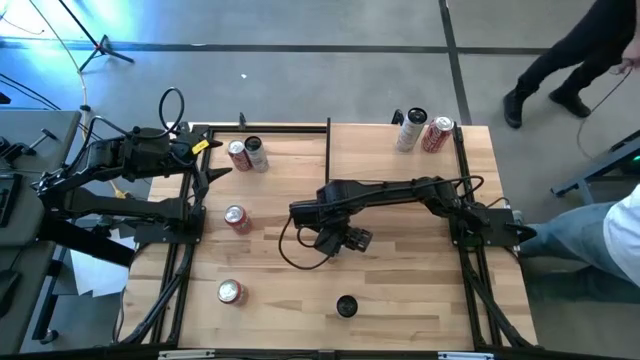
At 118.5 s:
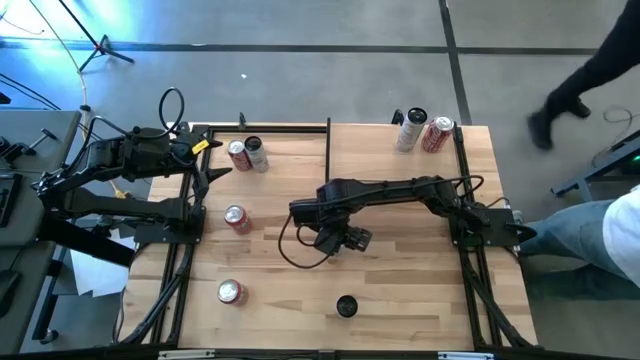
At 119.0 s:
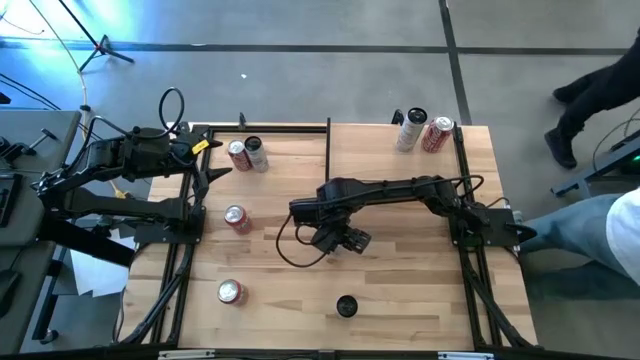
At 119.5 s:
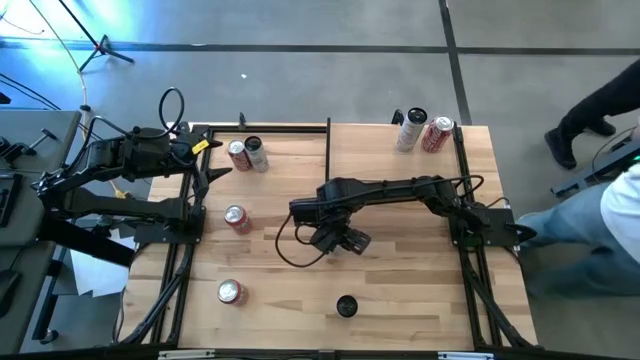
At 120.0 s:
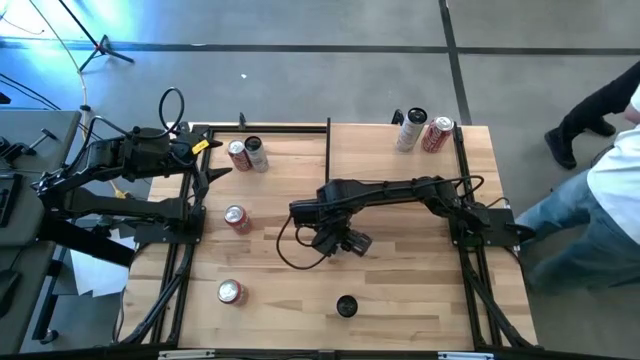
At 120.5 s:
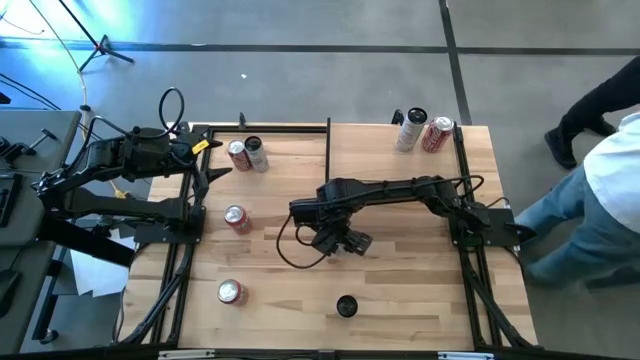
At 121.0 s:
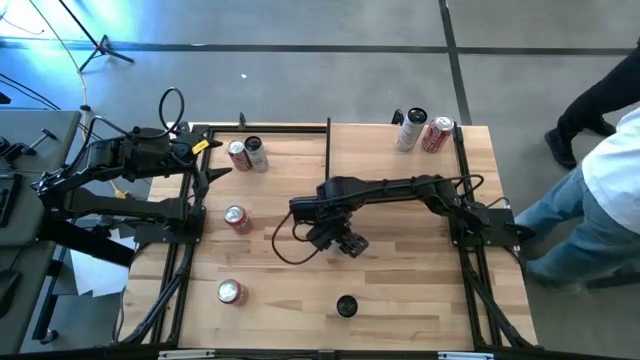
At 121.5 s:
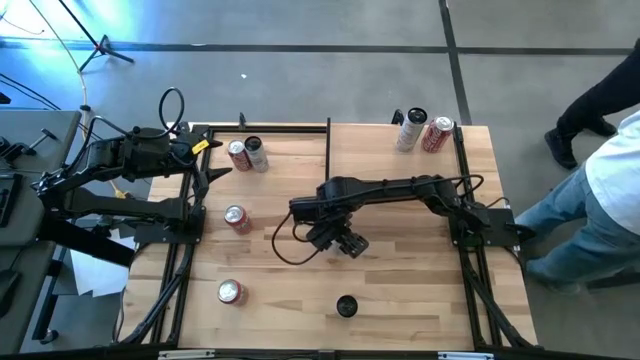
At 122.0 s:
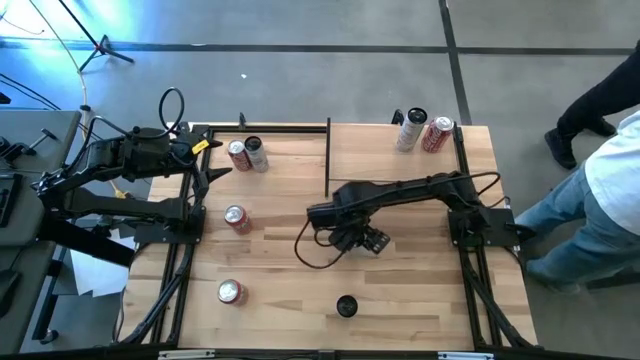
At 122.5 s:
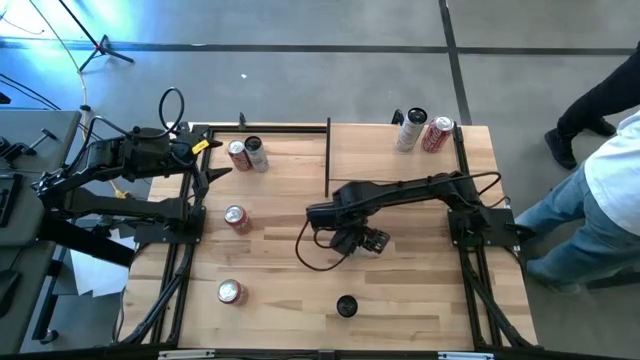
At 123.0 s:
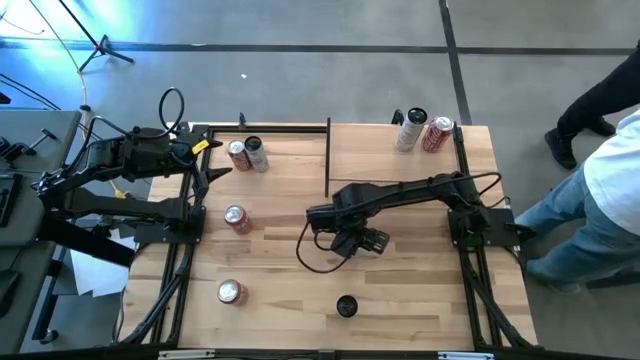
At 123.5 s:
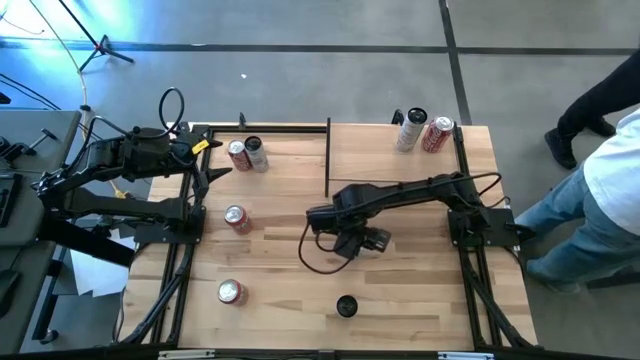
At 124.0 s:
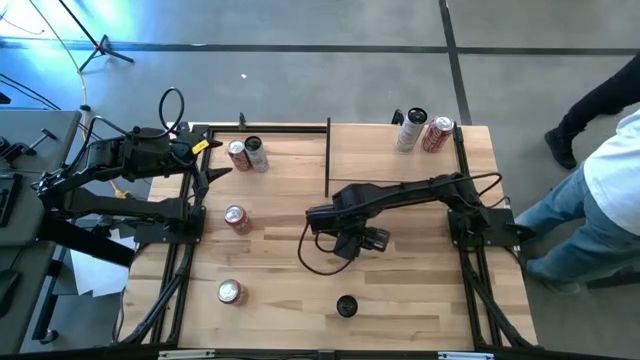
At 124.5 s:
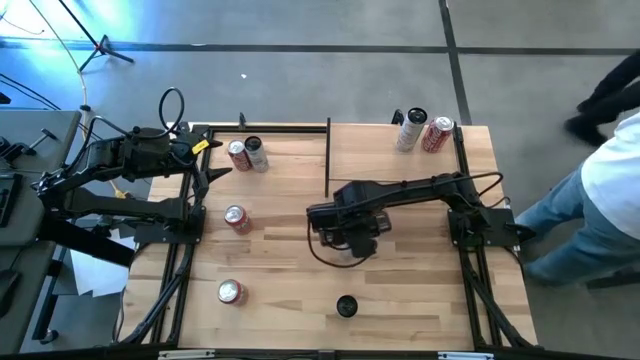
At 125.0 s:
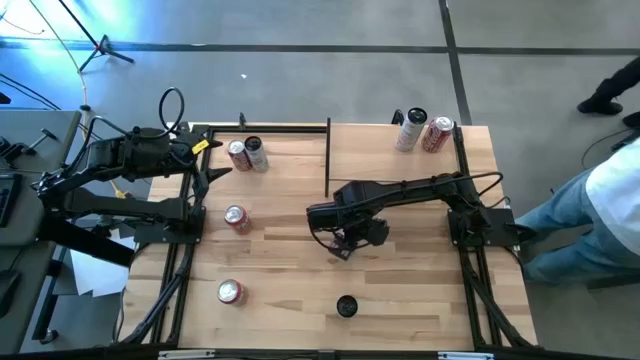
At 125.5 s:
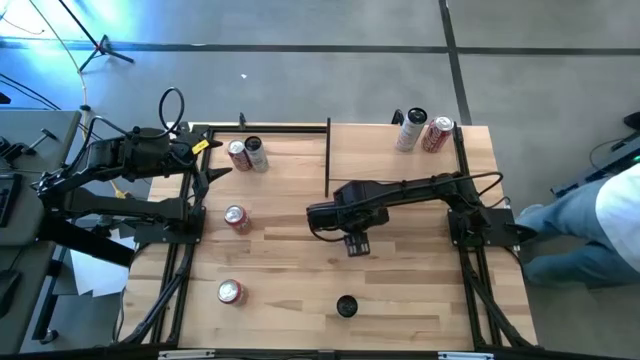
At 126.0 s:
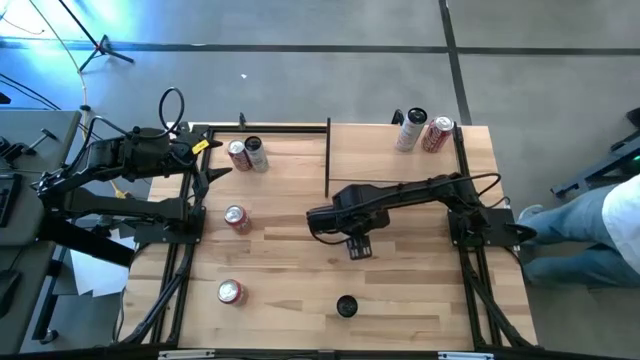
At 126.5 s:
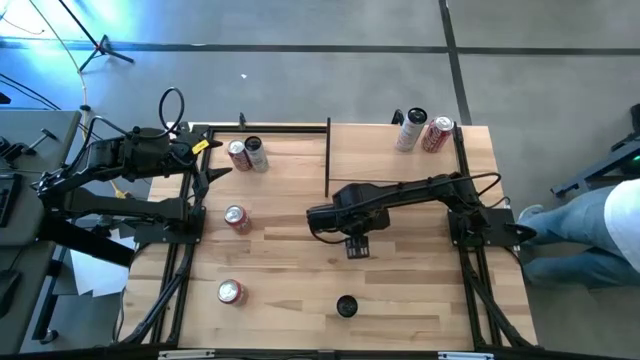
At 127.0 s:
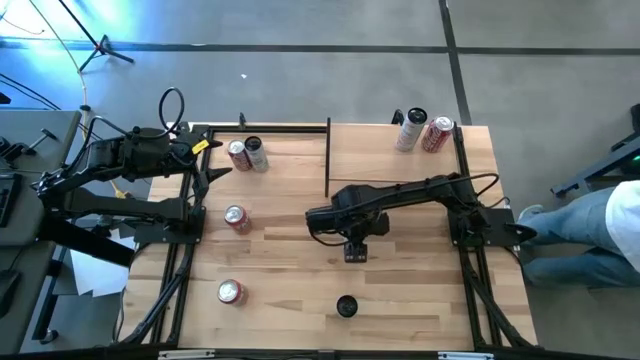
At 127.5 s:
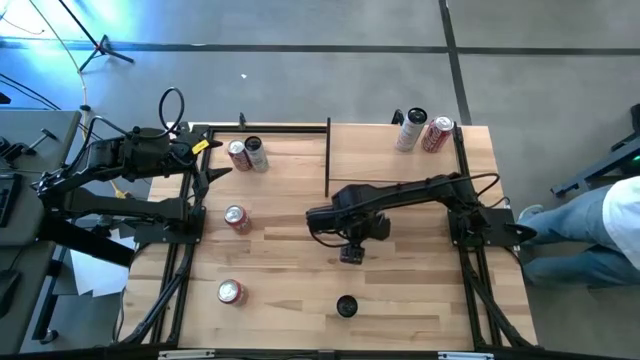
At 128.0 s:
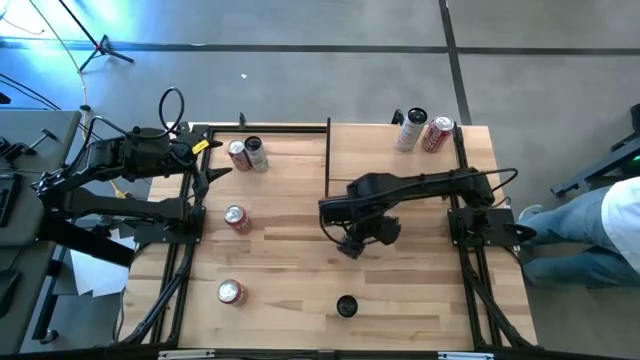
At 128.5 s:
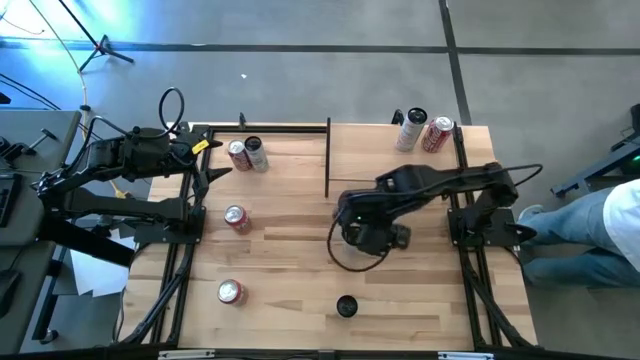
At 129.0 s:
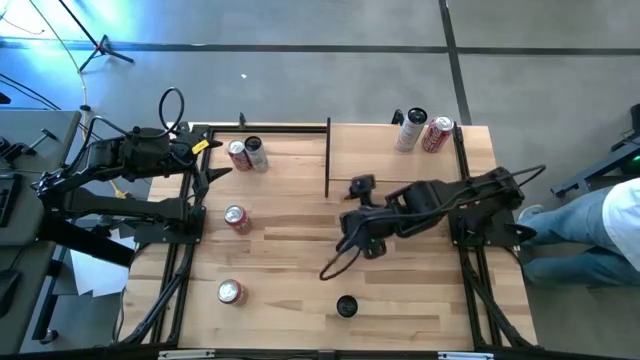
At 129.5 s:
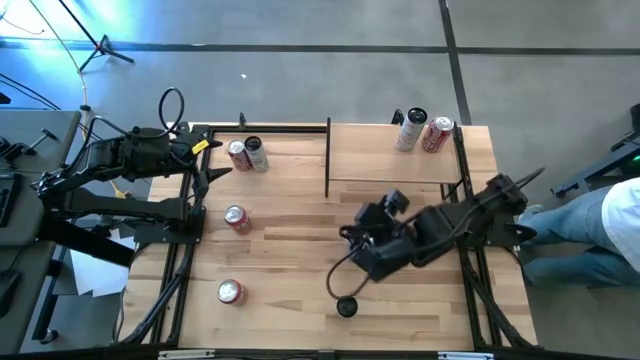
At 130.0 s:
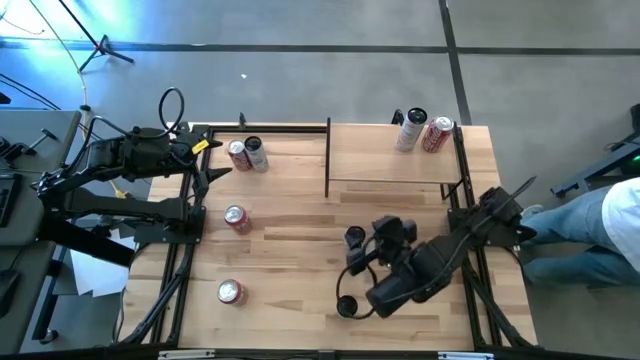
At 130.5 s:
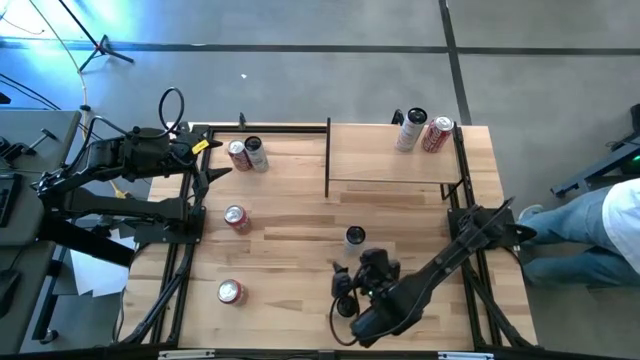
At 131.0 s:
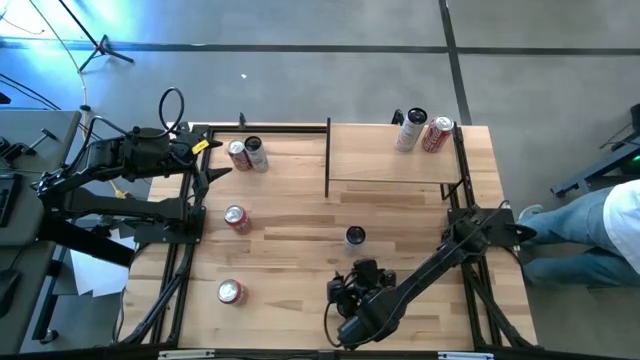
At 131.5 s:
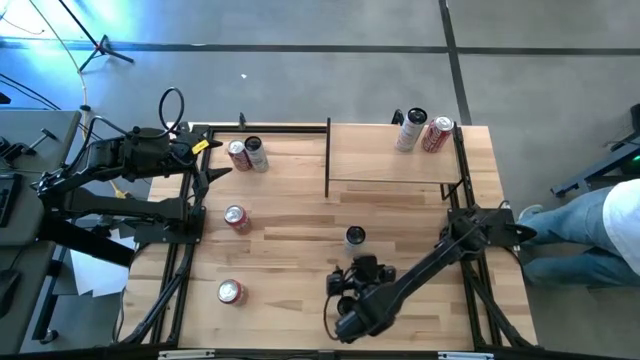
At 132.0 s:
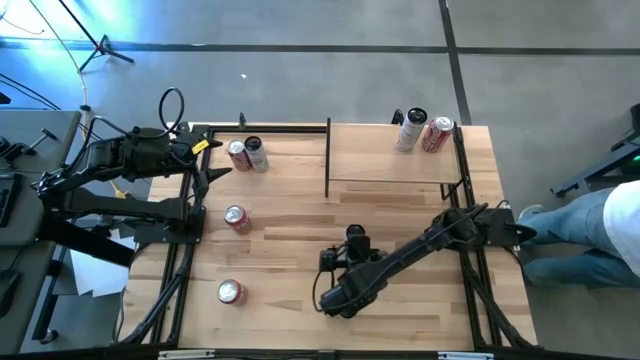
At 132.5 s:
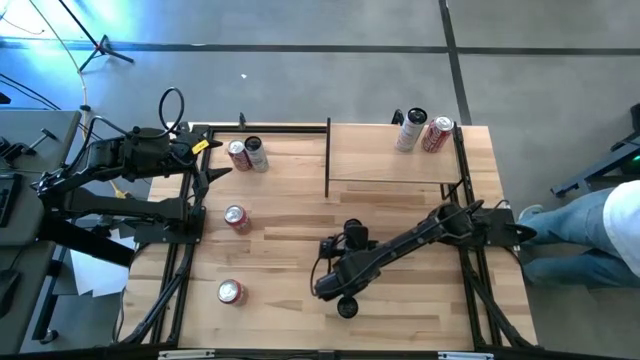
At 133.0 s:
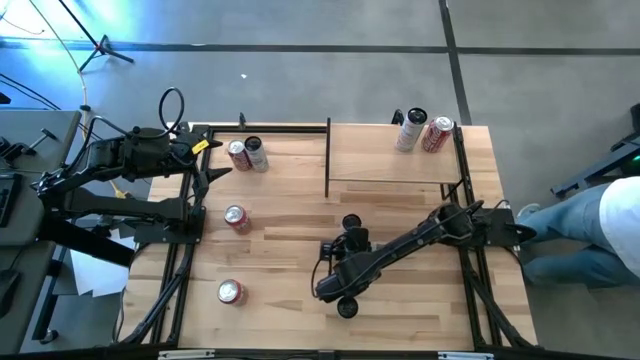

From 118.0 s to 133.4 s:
Task: Place canned beverage on shelf
Put the white soda can on the shelf

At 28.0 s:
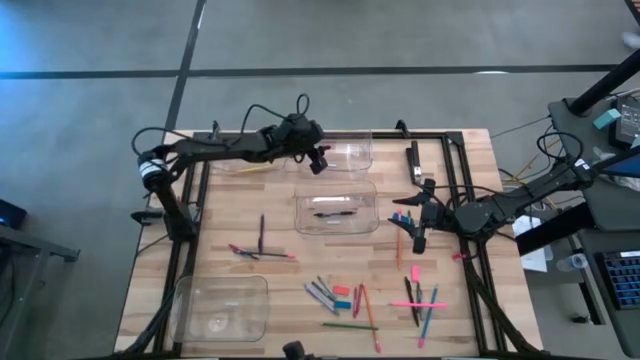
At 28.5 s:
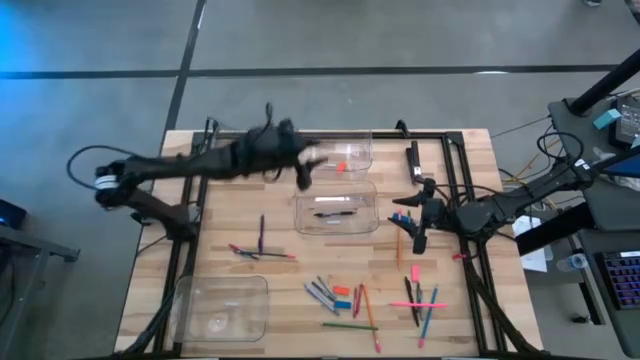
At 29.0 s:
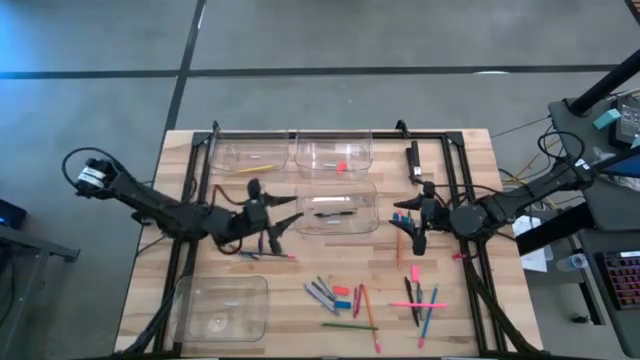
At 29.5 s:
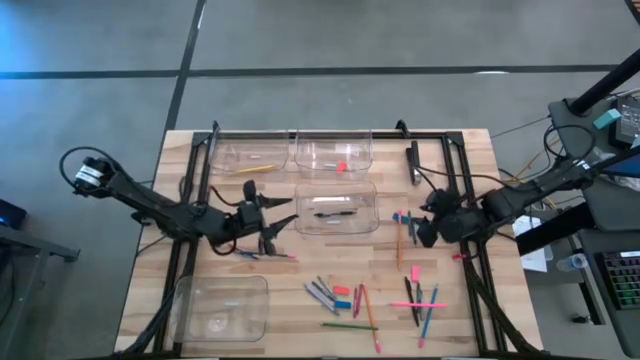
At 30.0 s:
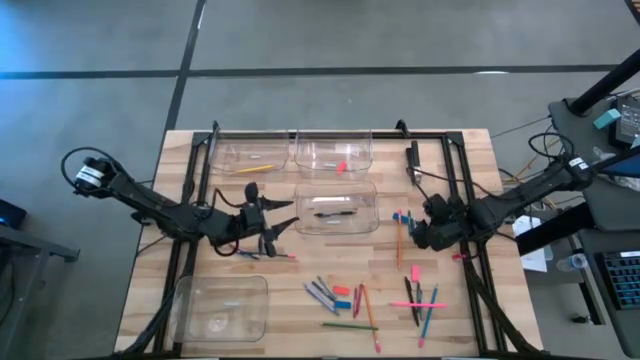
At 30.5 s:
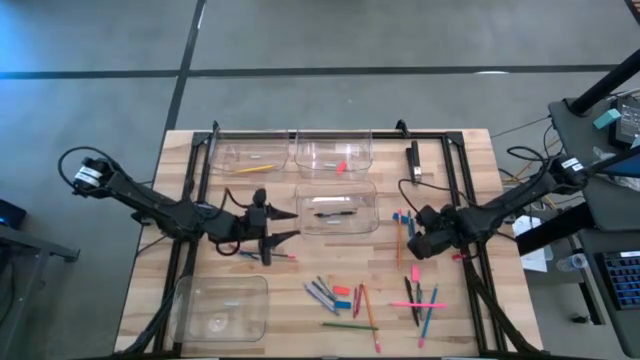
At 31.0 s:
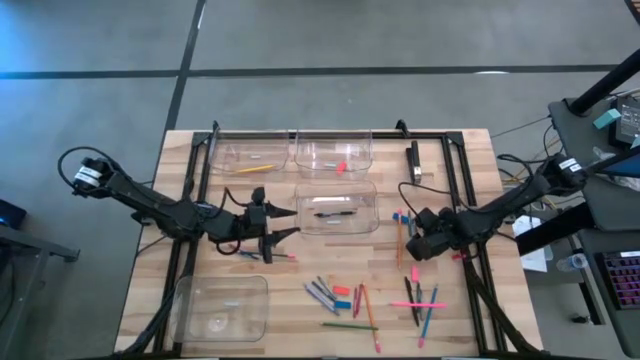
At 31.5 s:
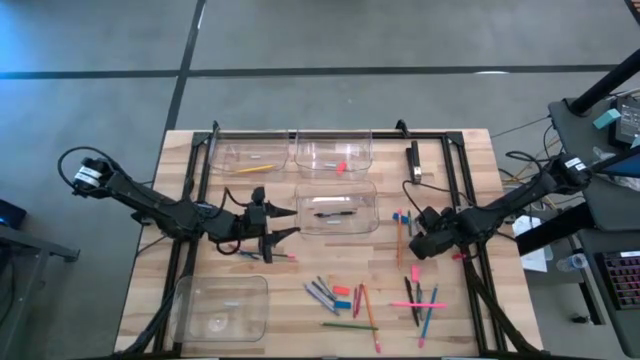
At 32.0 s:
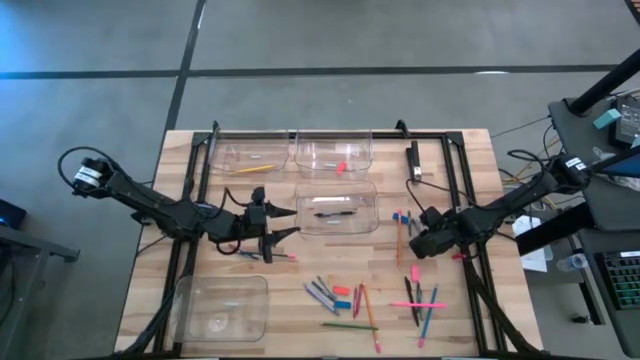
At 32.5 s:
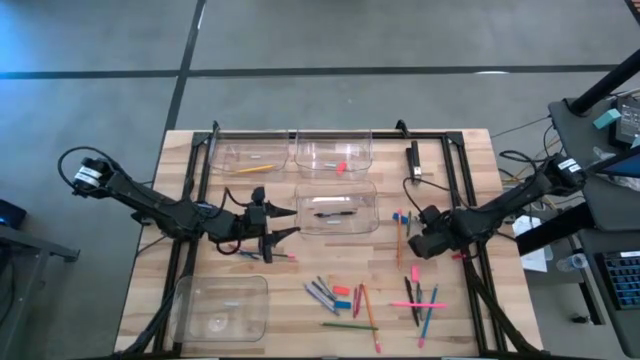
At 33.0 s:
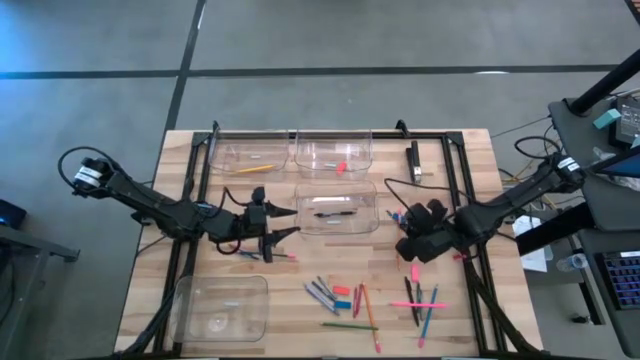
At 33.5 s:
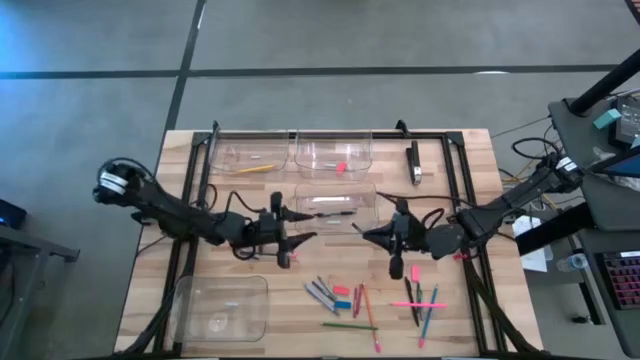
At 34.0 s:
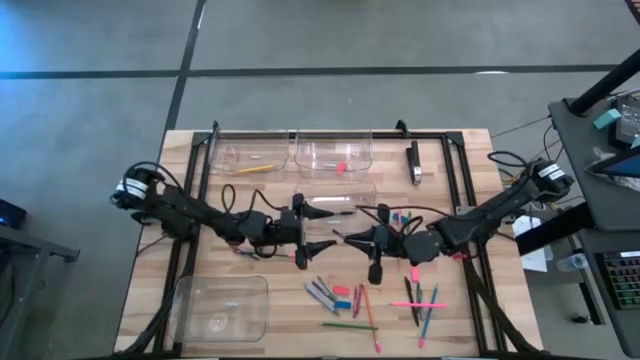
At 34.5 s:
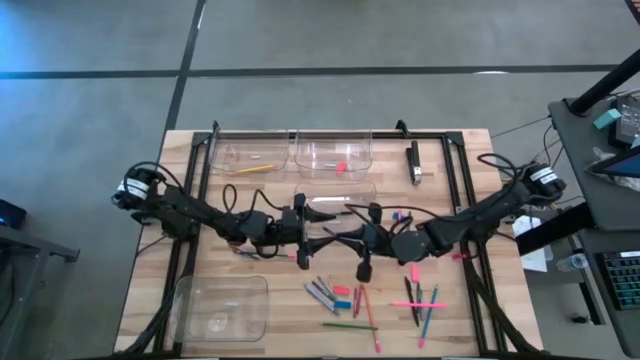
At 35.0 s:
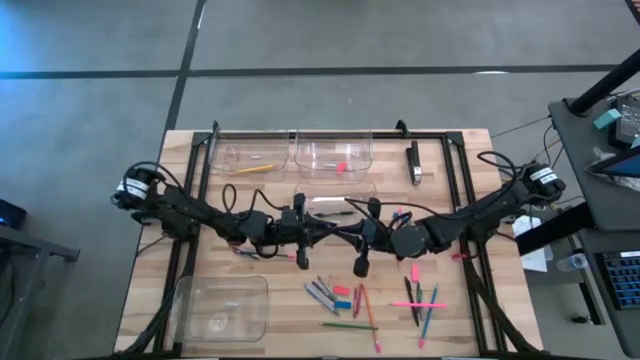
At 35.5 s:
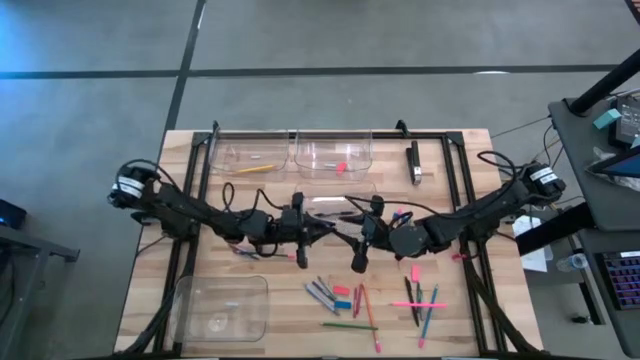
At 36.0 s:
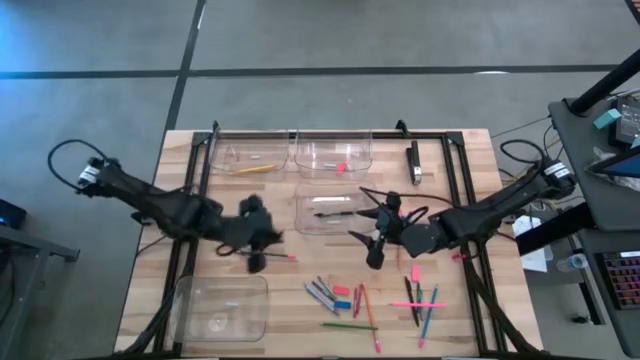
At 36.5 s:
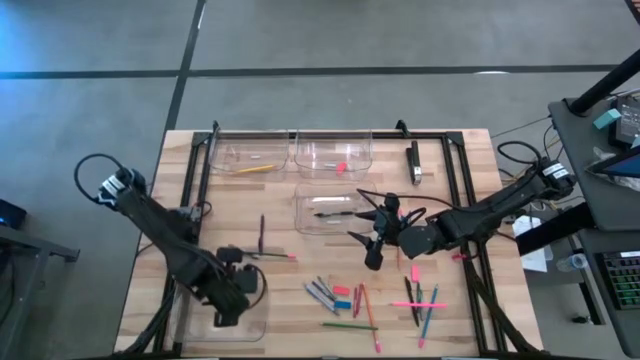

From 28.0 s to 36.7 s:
Task: Sort crayons/erasers/pens/pencils in bins
Put the top right blue crayon into the bottom transparent bin
